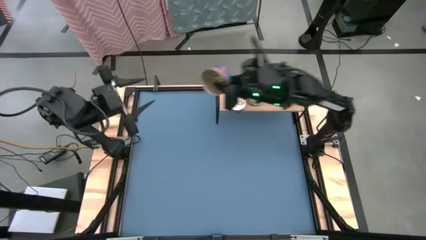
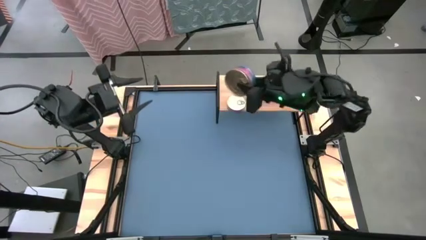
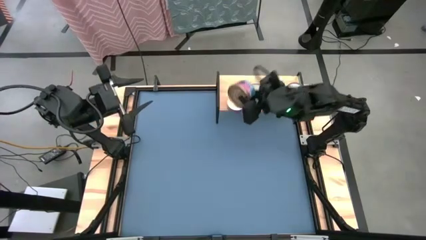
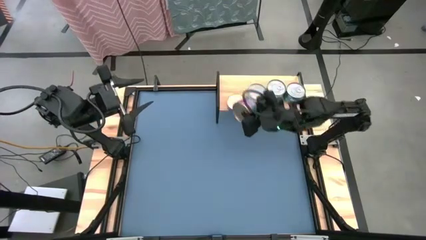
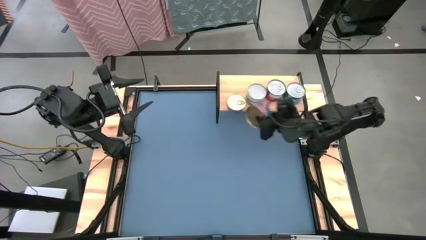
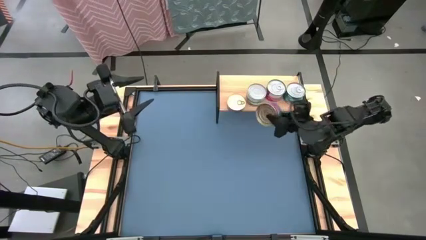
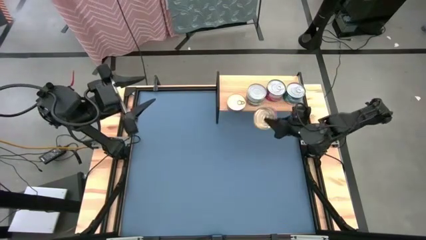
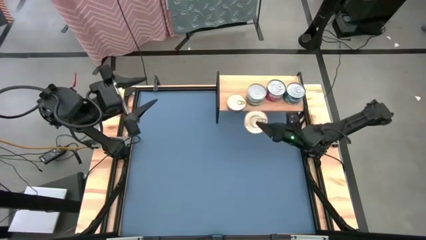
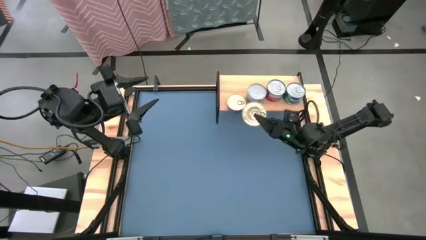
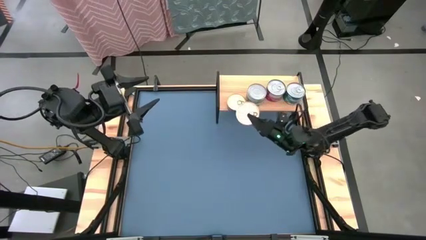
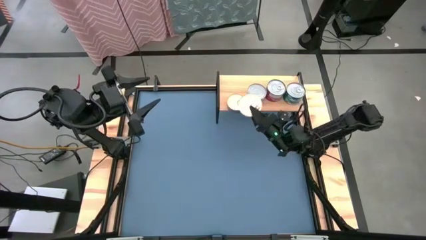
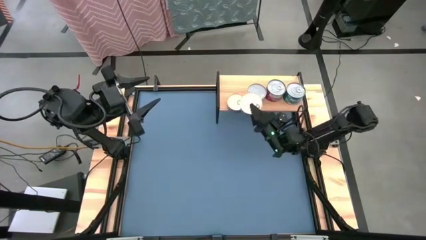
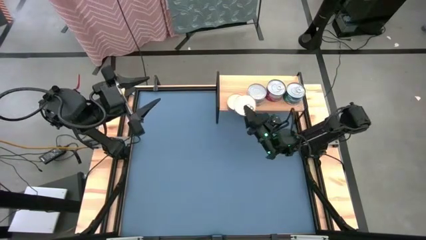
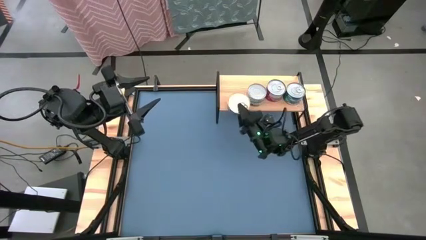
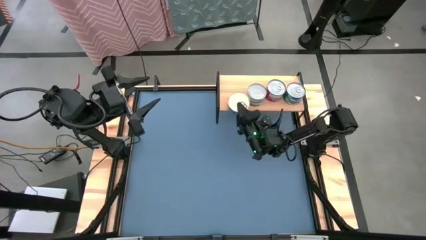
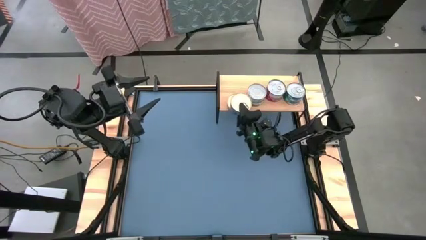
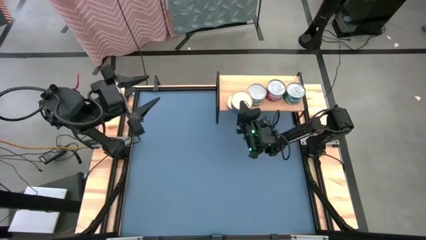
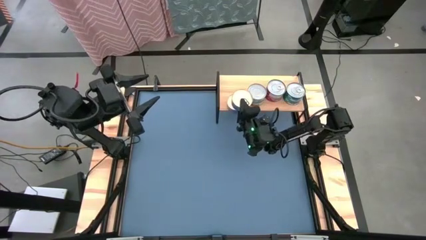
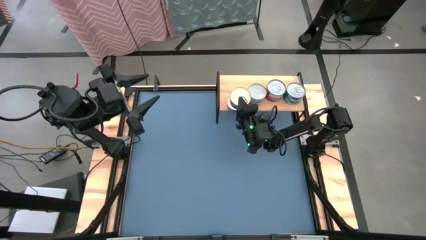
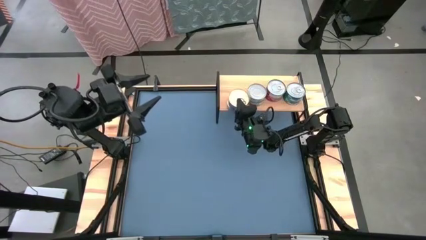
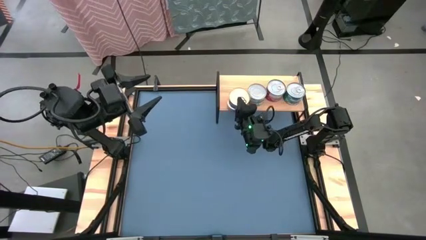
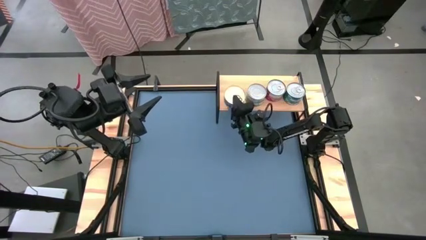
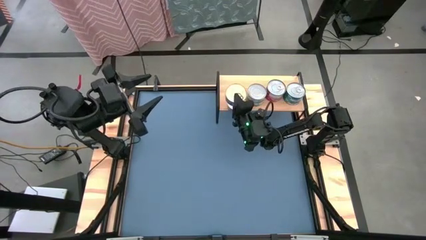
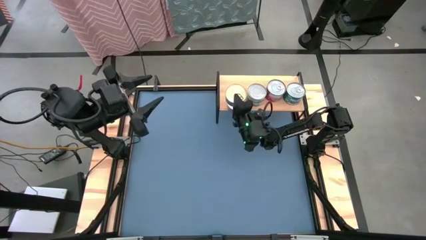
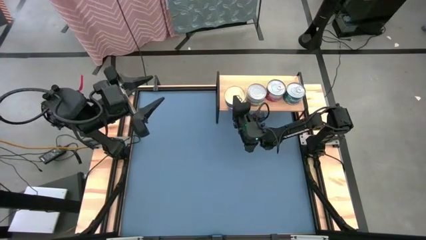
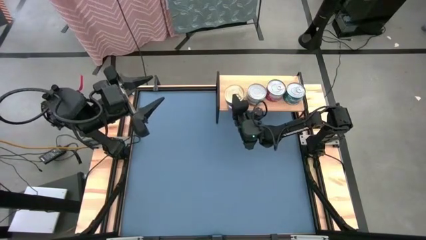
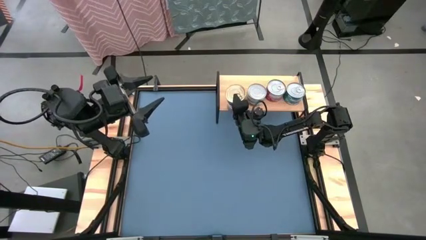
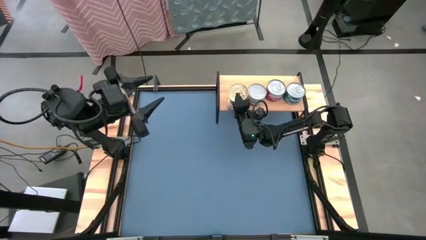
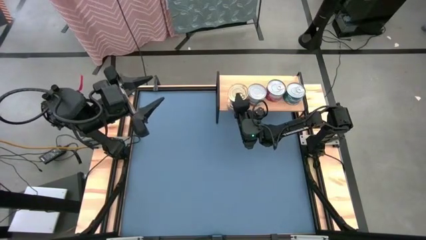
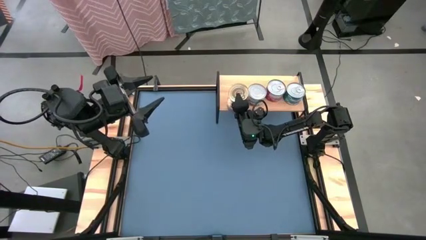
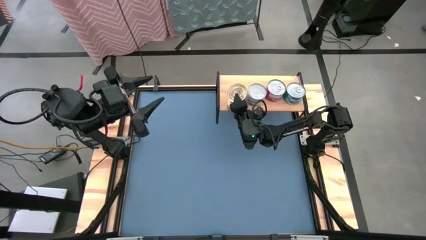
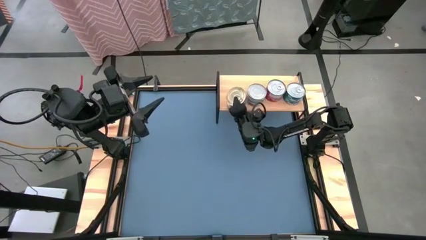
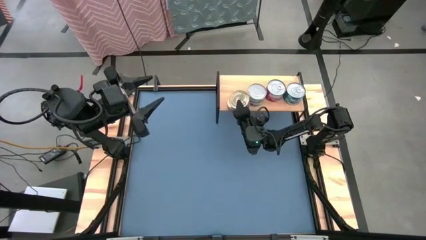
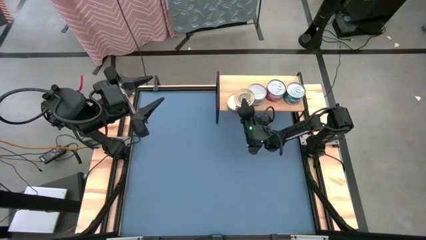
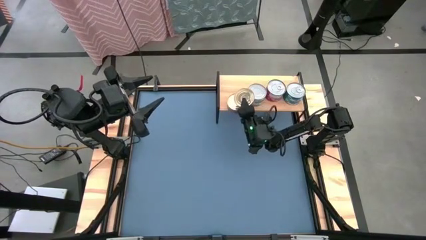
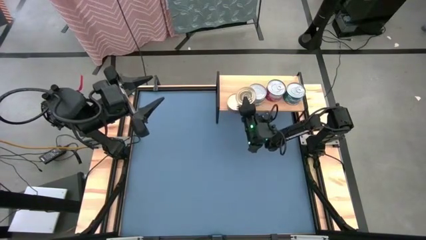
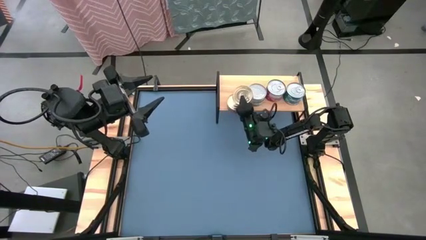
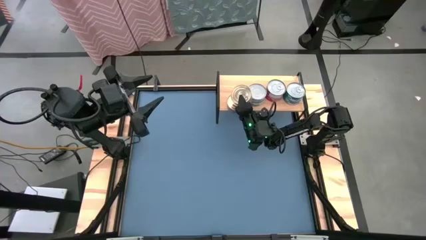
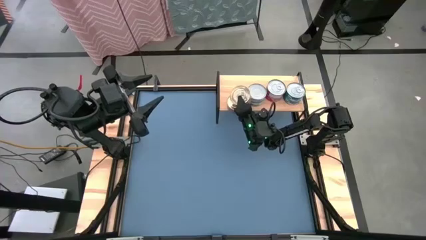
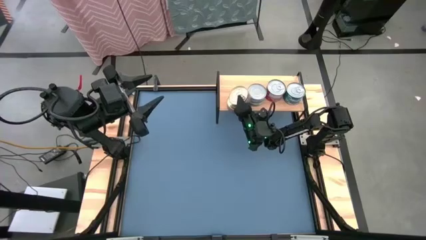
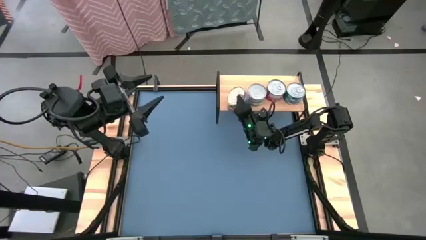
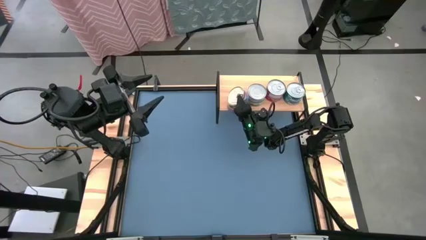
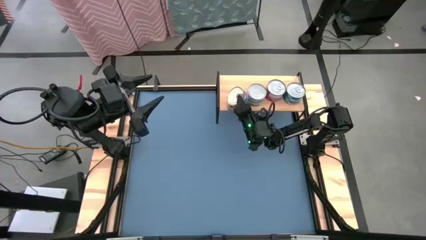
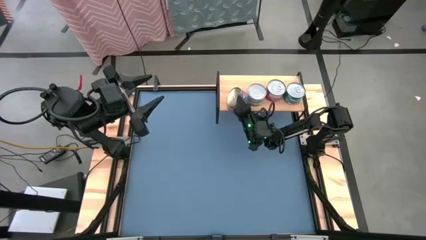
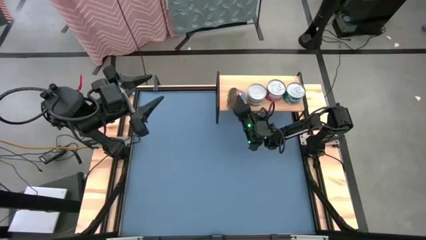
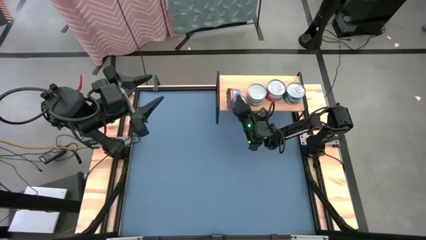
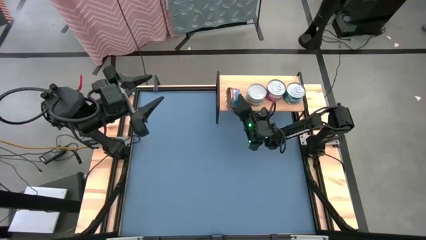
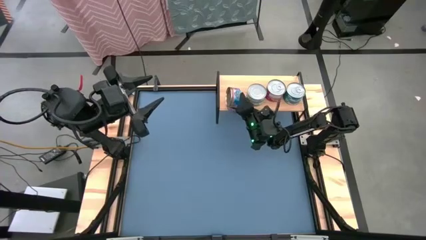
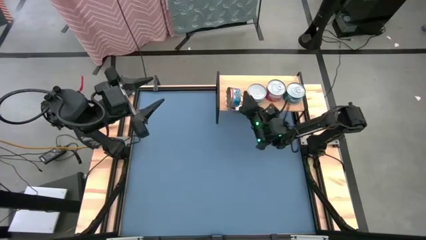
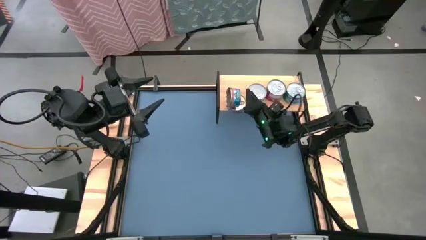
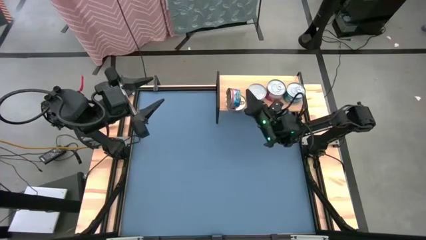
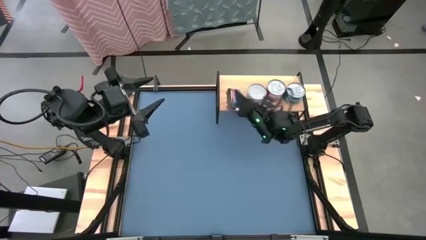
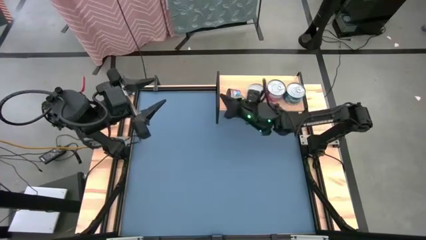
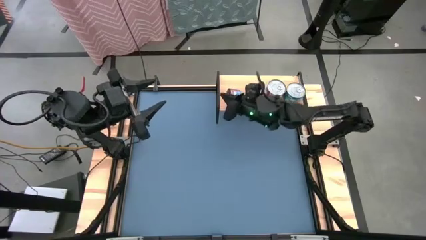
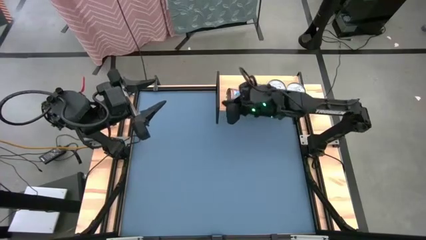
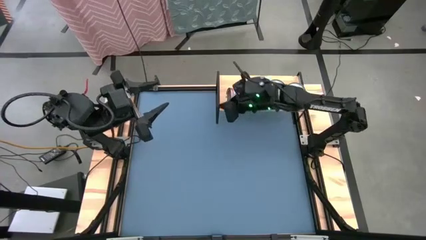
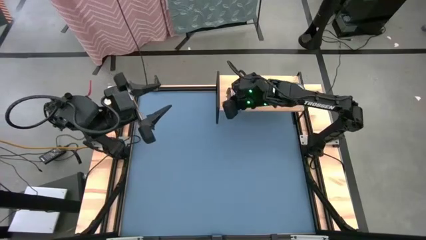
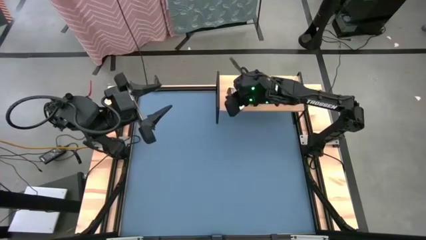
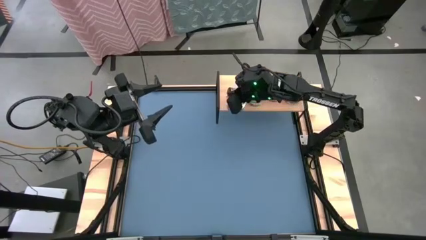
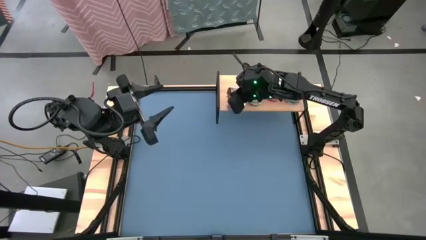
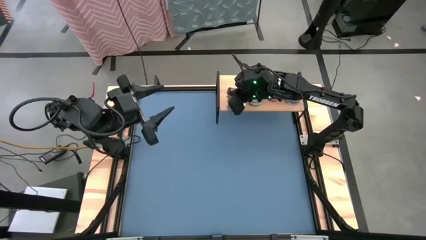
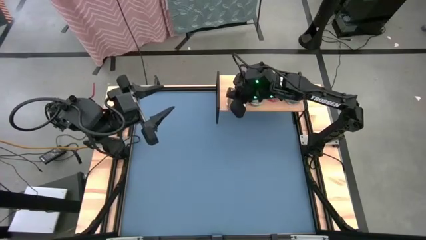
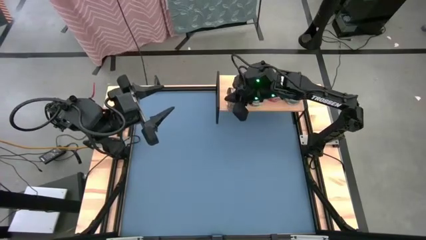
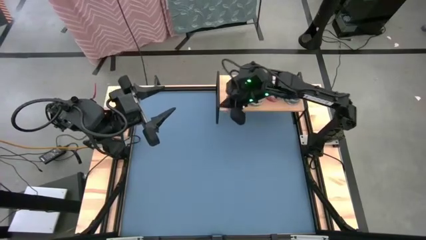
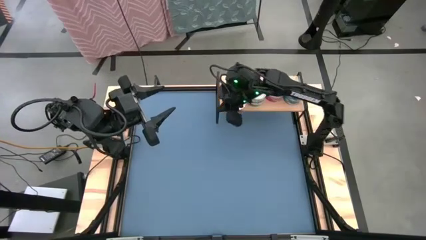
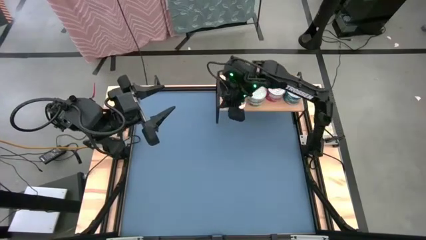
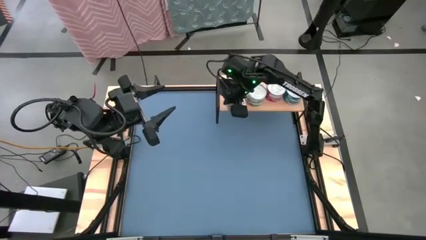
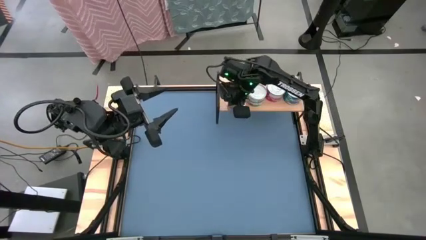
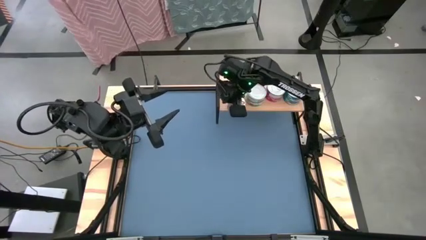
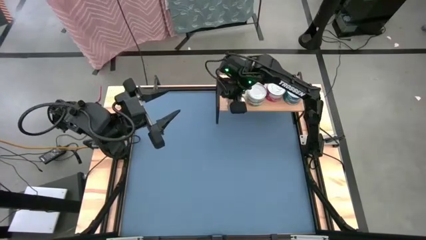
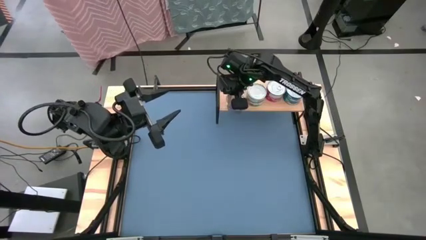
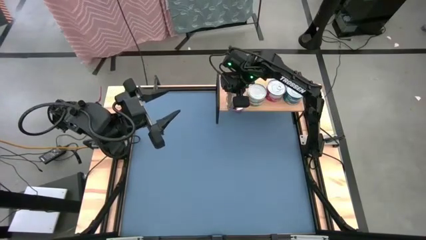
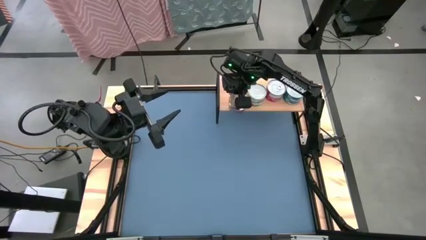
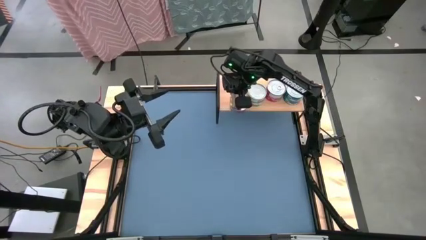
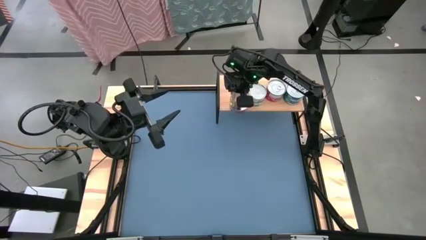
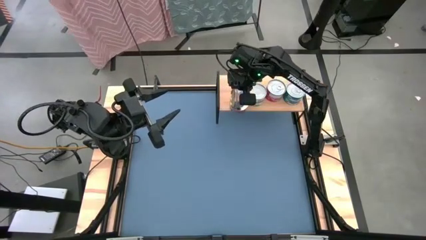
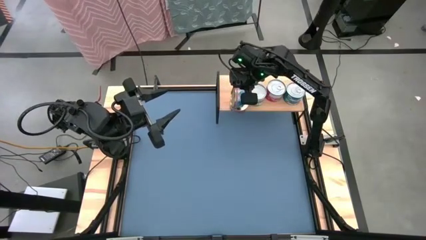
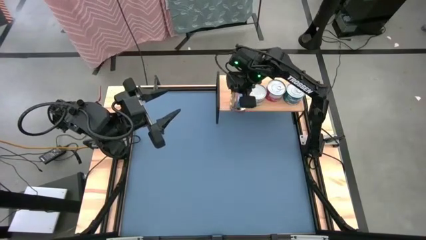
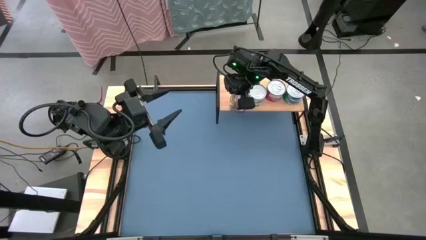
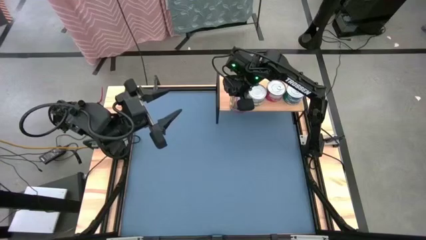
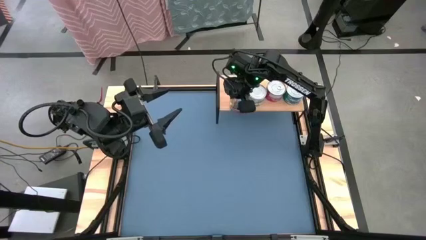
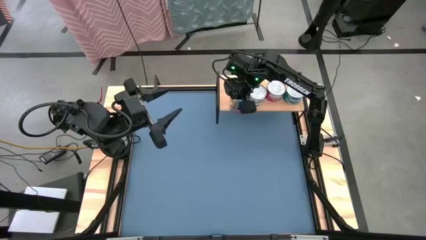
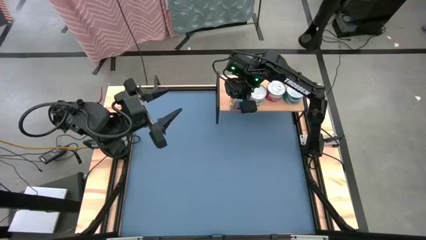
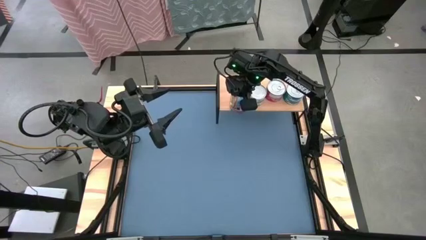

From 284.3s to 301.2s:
Task: Stack canned seafood by type on shelf
Stack the blue-pink tuna can on top of the blue-pink tuna can on the shelf
